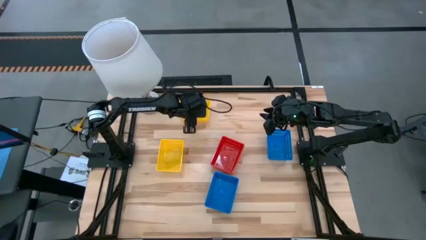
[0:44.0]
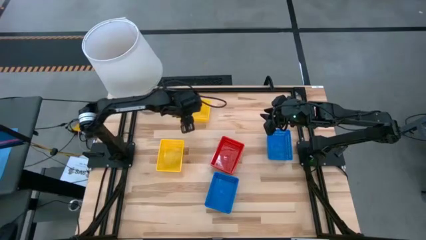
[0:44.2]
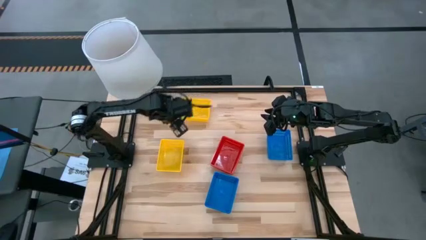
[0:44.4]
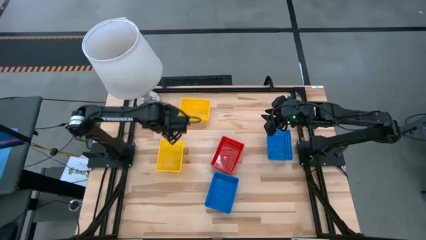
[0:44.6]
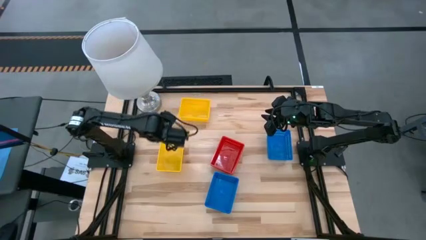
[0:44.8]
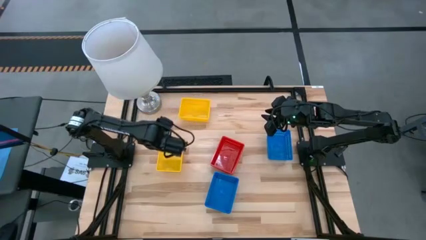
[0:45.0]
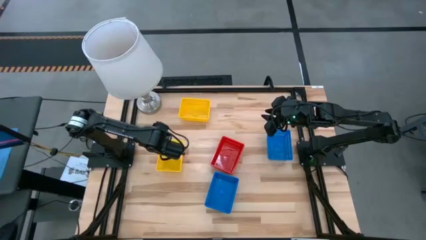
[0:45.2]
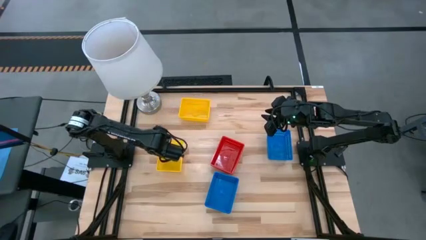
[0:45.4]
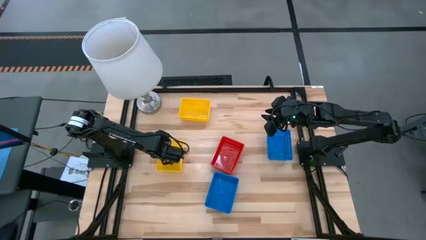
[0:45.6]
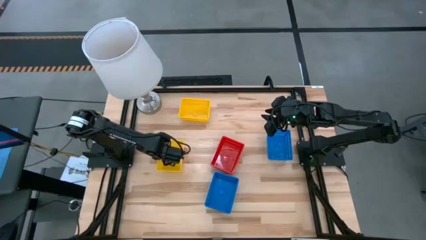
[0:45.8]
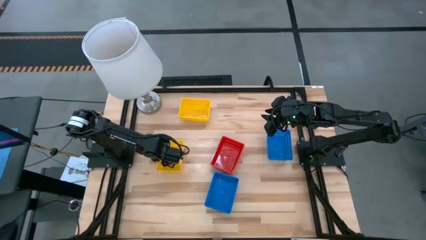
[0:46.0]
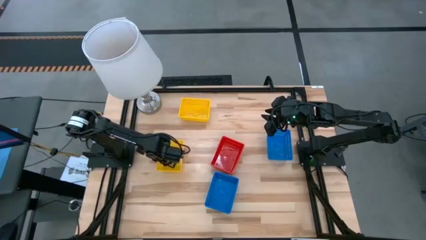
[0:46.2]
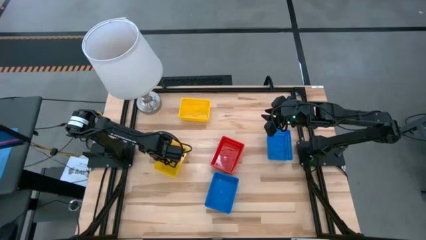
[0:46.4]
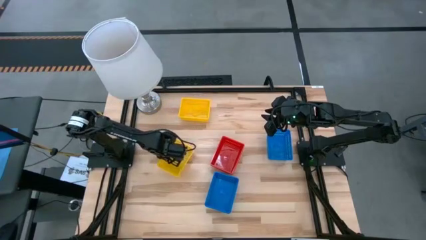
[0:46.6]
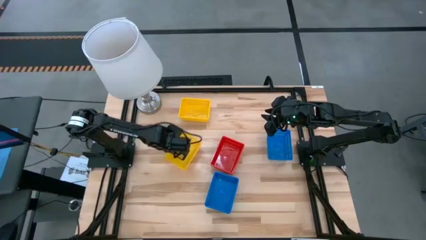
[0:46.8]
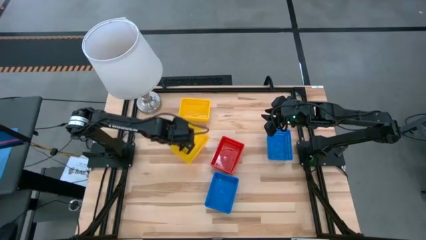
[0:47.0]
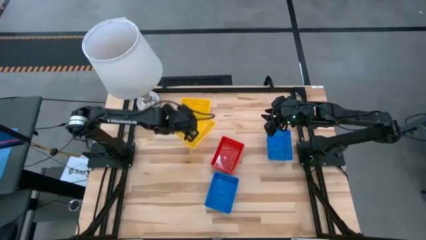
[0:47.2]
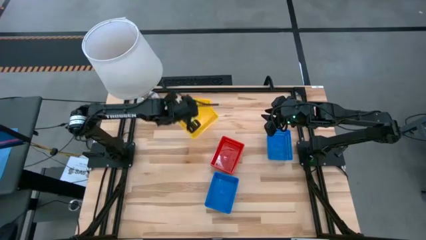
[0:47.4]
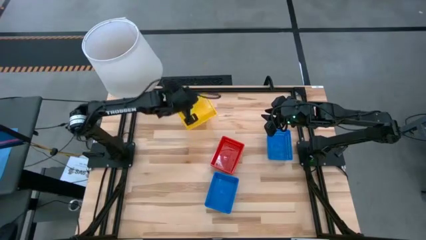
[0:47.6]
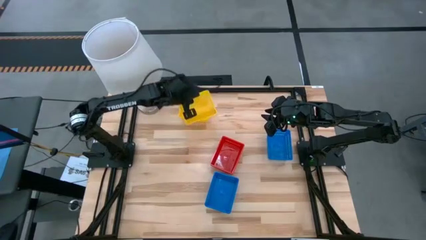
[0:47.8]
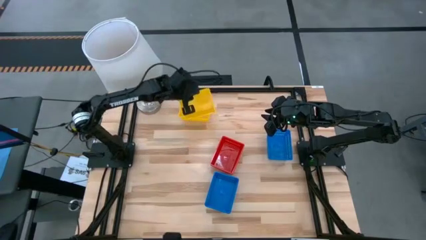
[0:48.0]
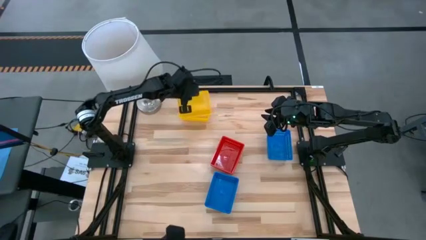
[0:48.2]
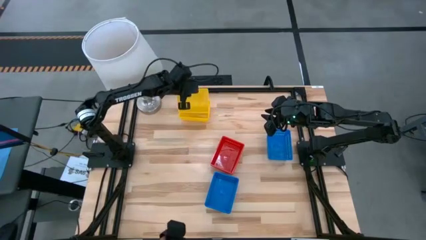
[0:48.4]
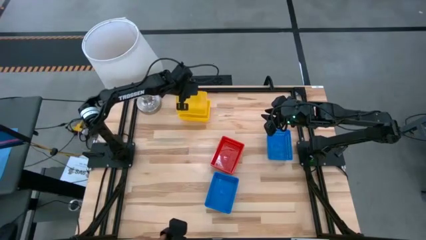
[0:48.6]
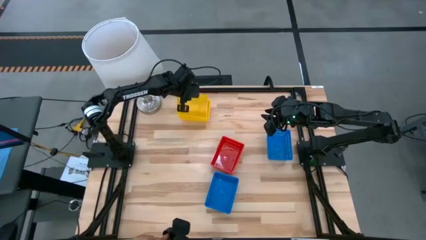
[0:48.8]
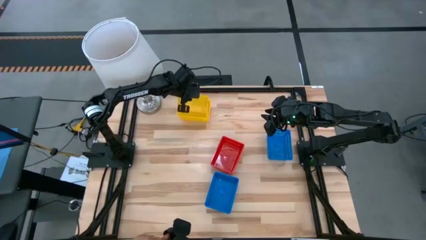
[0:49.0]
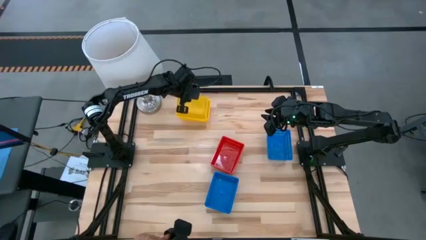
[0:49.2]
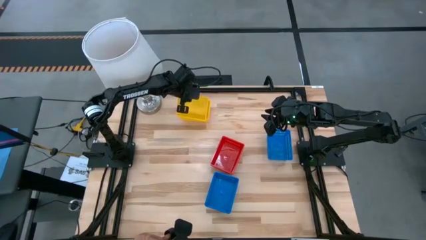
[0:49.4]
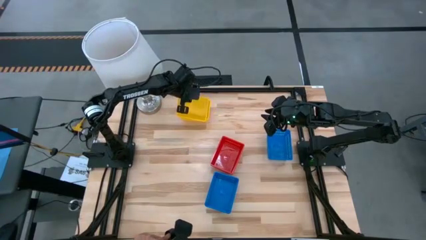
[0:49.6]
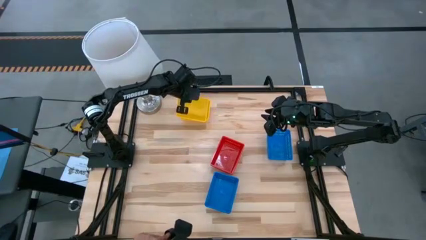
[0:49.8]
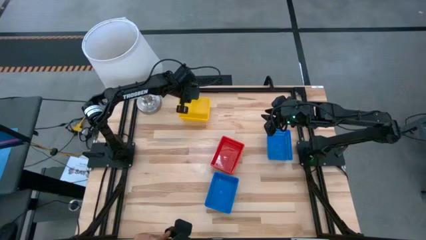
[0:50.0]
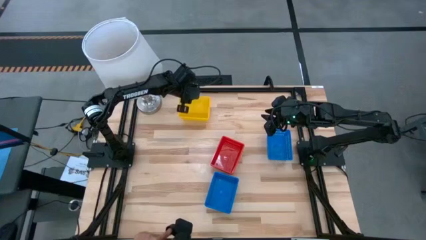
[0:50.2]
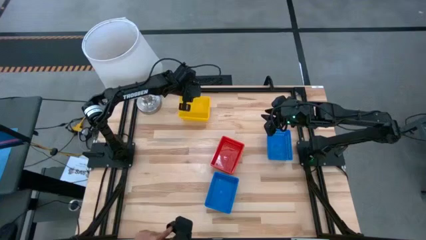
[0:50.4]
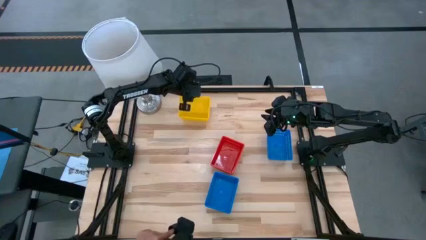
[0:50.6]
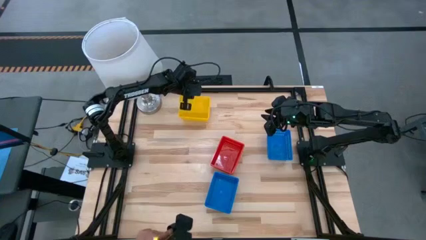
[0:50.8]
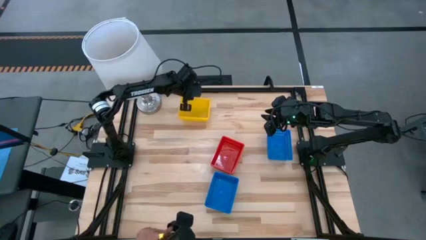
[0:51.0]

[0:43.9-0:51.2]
Stack the bottom yellow basket on top of the top yellow baskets

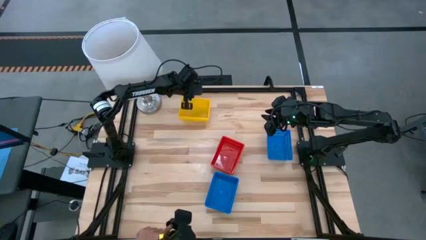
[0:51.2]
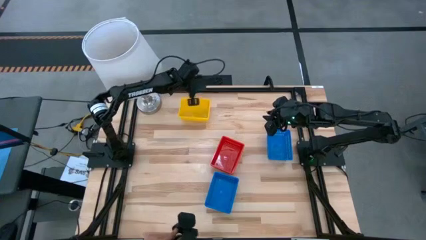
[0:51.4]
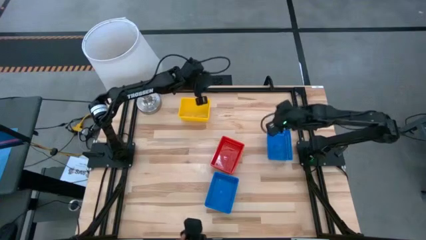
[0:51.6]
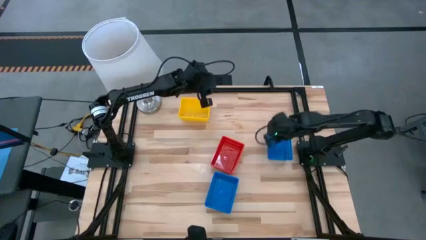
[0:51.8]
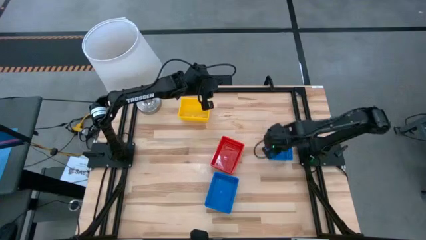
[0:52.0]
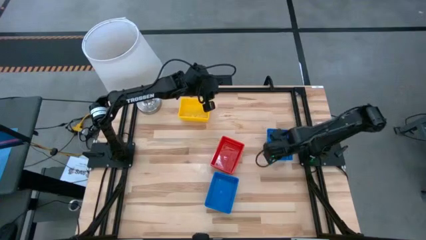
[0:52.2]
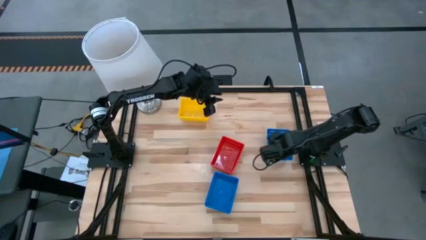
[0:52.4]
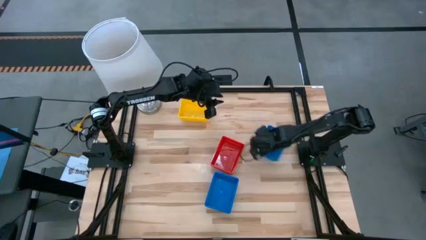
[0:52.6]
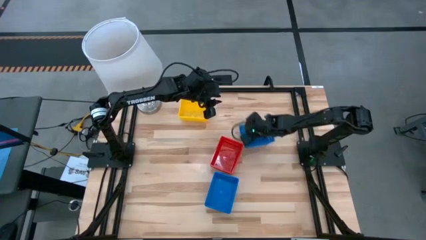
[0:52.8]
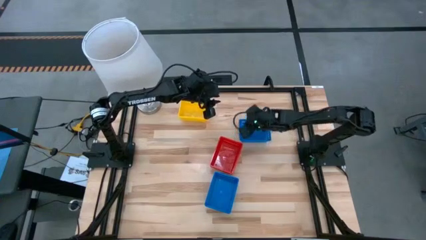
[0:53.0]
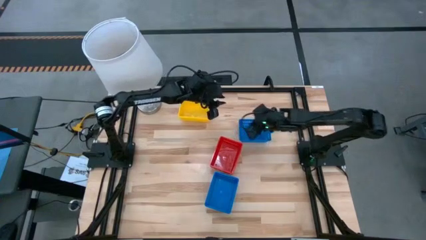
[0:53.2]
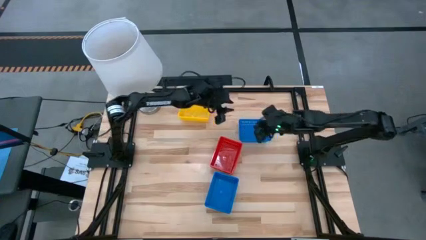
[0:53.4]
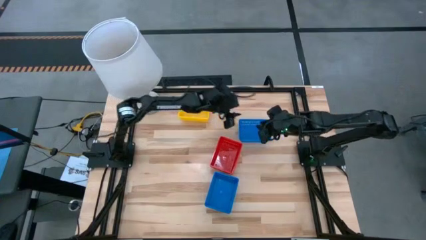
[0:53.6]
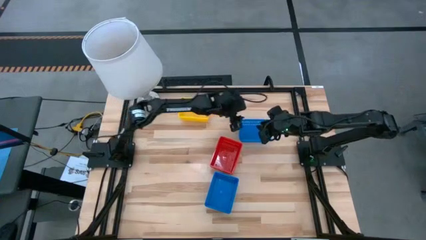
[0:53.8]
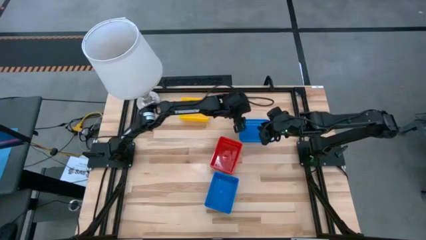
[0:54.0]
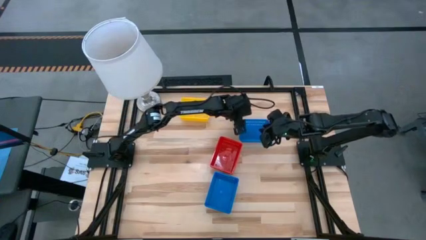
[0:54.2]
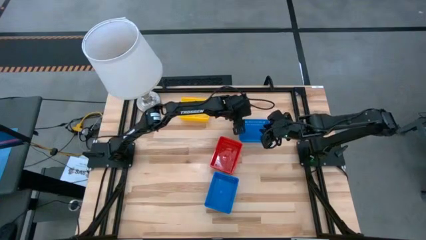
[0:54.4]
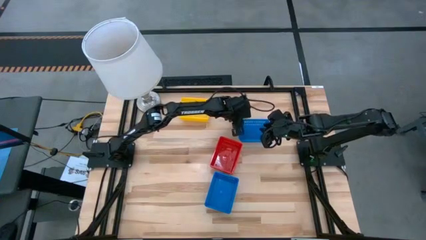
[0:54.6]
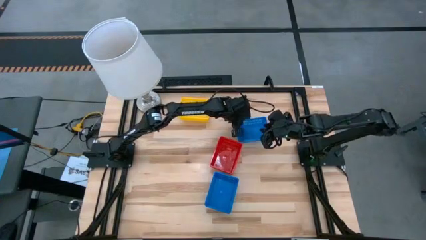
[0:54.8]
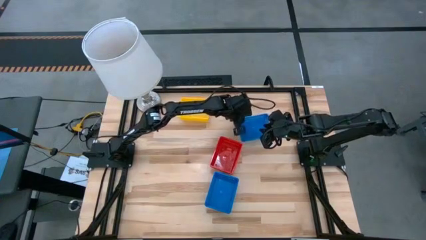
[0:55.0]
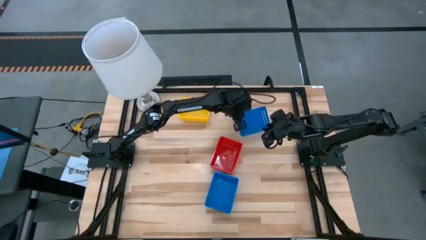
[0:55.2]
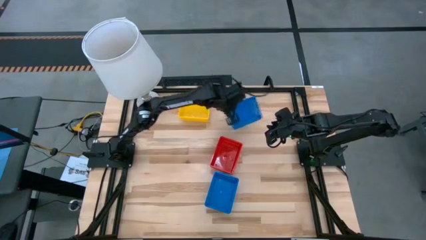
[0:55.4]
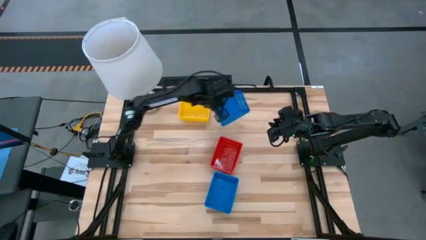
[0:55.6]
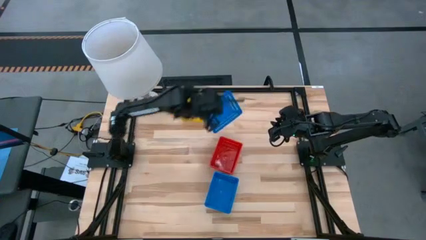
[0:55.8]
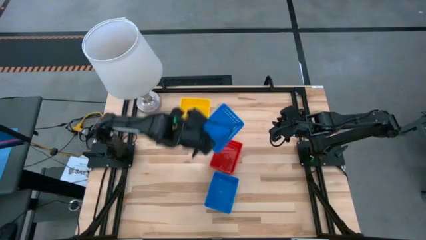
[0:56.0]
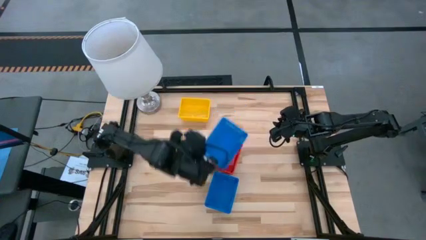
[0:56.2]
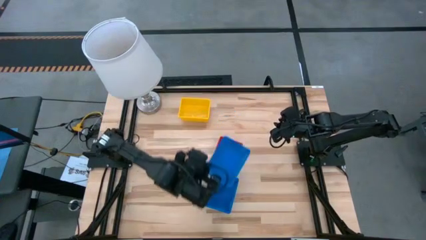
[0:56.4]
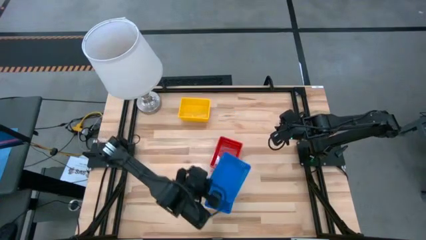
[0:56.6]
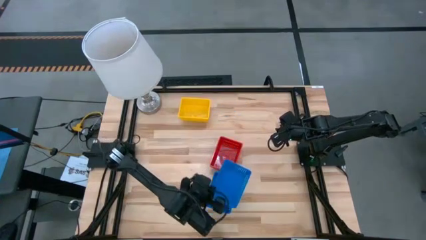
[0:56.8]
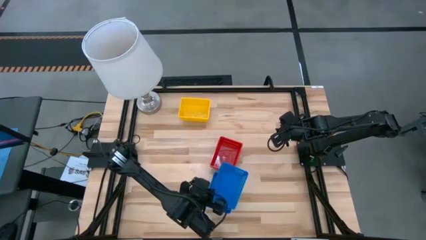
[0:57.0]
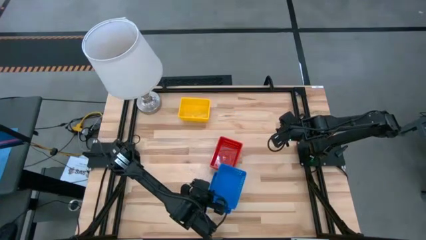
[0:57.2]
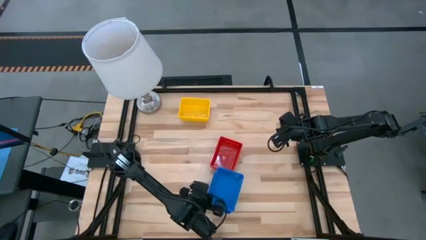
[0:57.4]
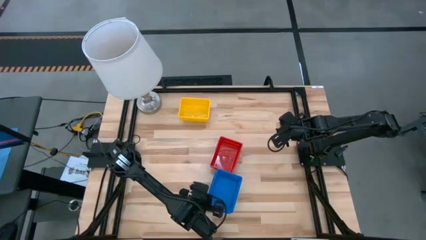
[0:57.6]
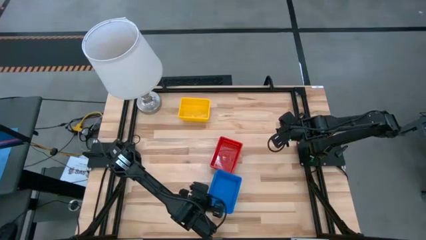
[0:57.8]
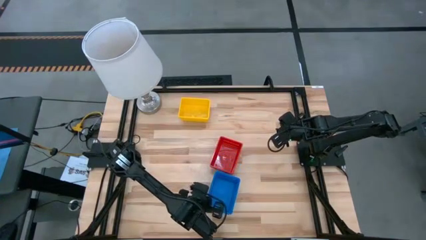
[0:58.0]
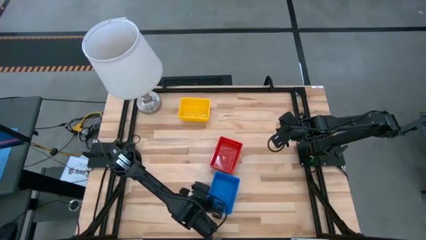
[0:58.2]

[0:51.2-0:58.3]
Stack the top blue basket on top of the bottom blue baskets

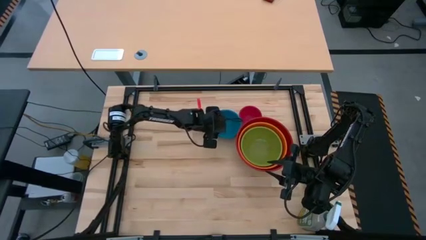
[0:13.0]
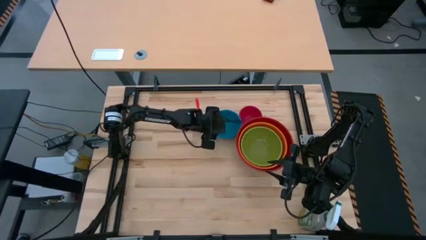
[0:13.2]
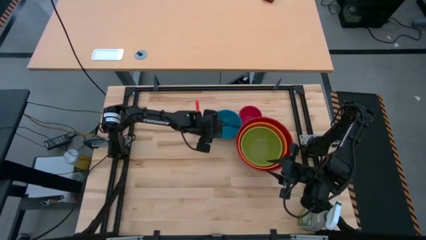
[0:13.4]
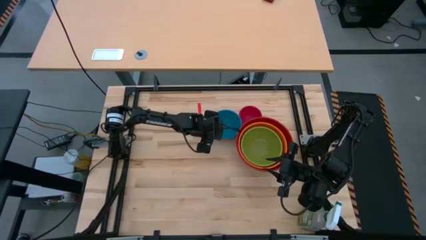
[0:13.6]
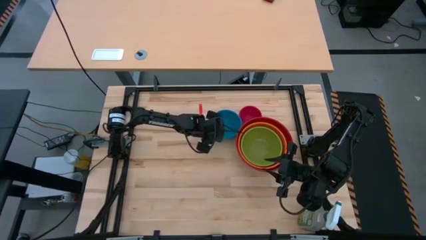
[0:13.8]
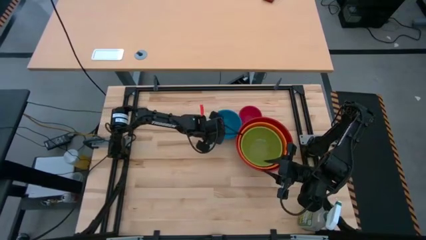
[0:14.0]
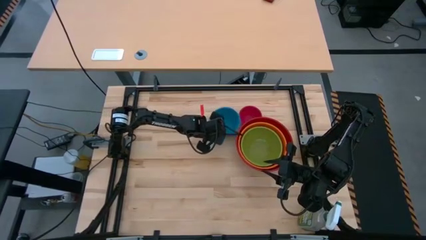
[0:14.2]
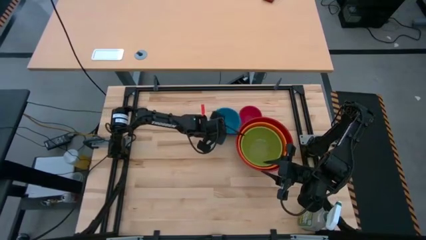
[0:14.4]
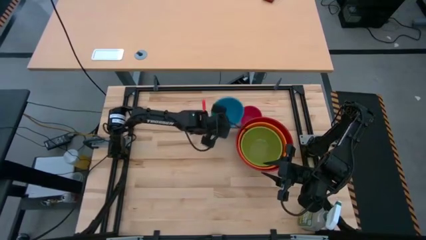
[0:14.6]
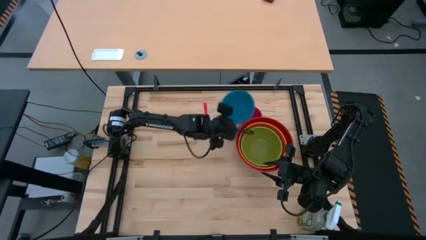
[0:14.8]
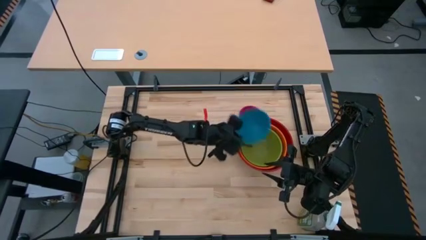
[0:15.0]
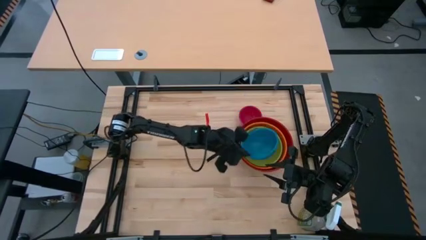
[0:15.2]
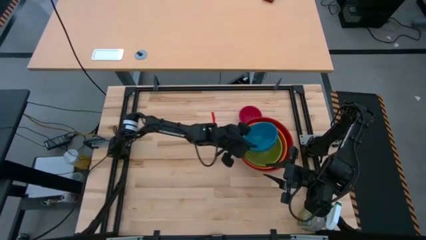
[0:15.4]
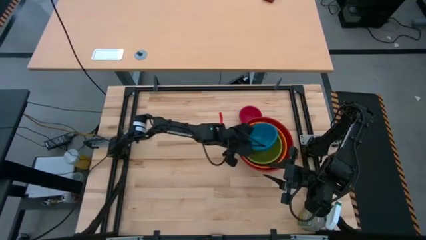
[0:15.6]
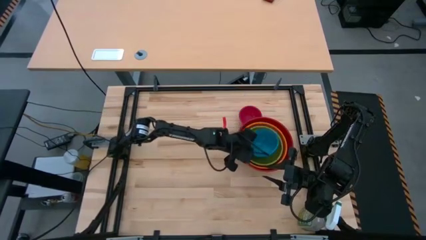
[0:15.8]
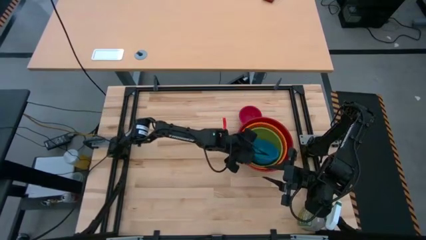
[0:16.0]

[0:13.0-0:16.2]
Stack the blue bowl into the green bowl
